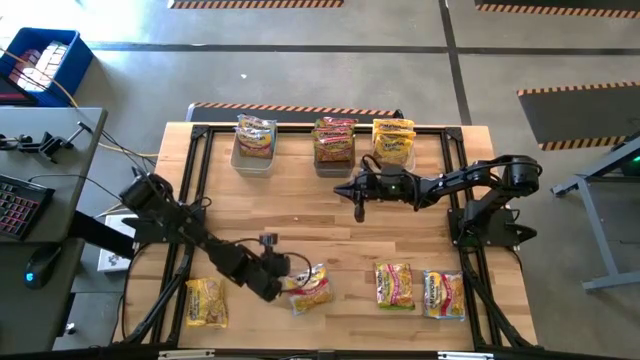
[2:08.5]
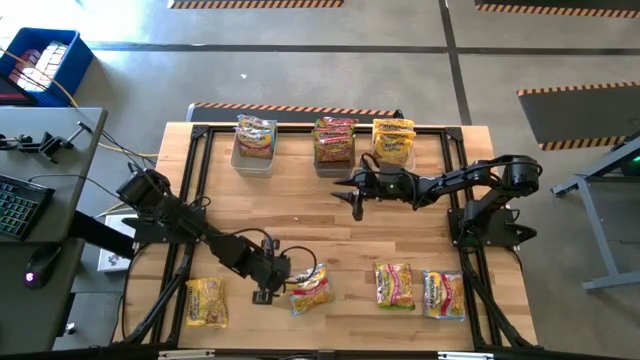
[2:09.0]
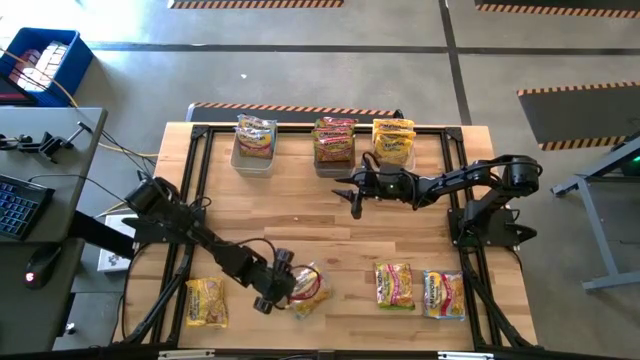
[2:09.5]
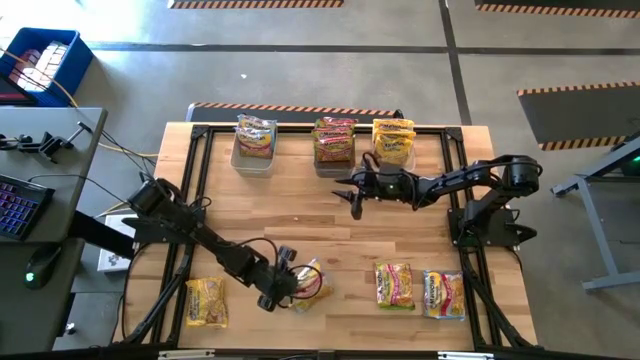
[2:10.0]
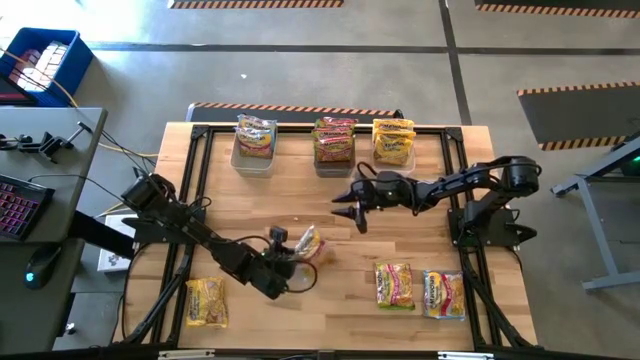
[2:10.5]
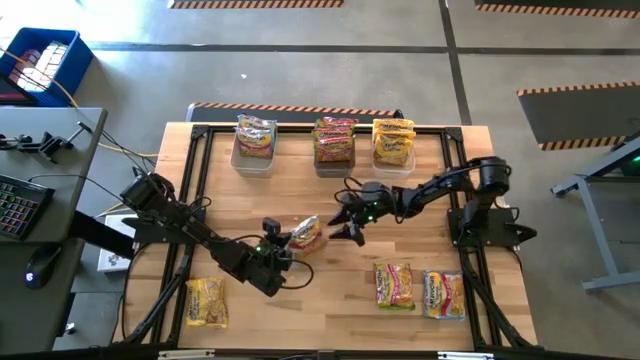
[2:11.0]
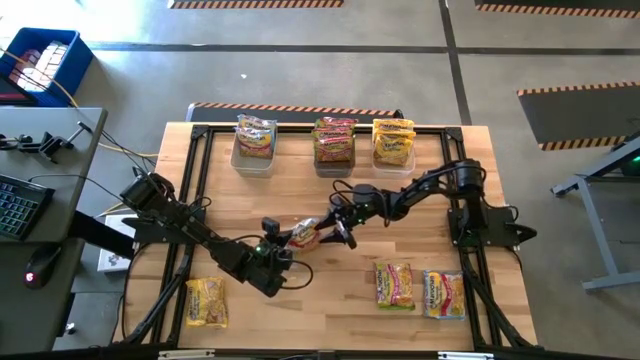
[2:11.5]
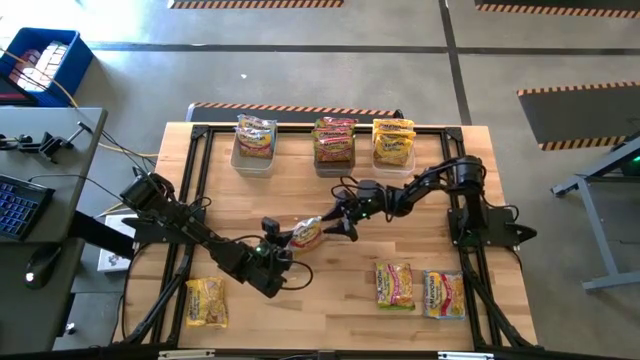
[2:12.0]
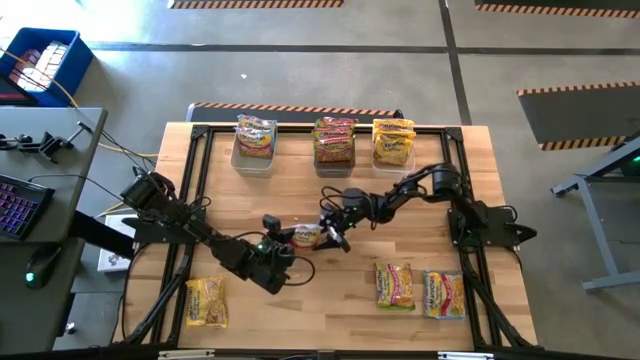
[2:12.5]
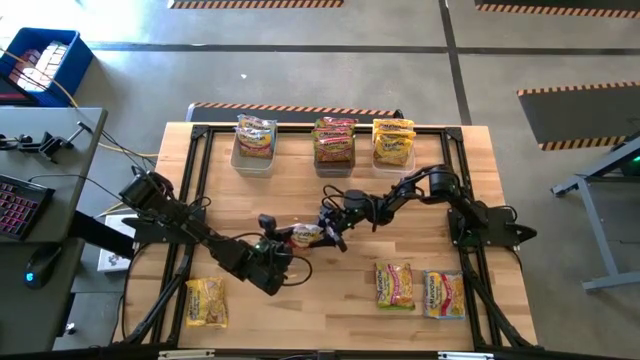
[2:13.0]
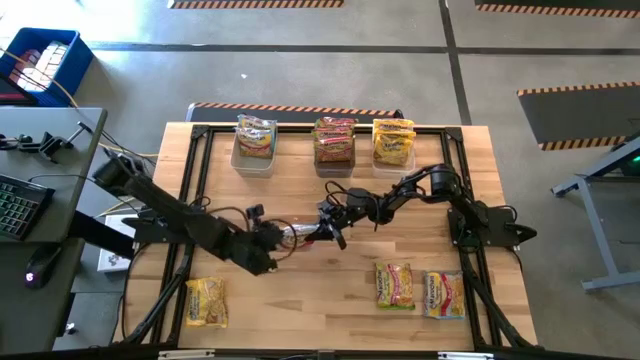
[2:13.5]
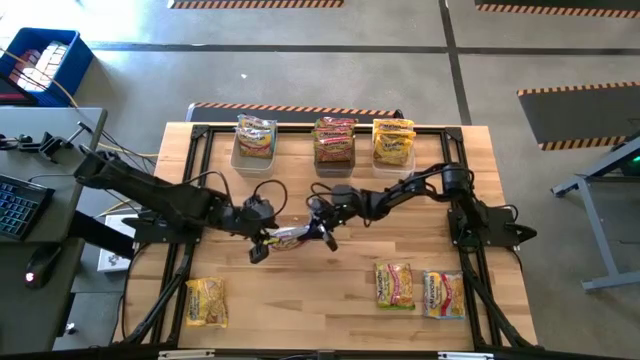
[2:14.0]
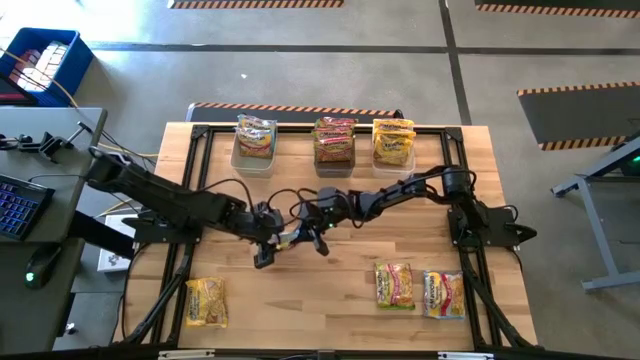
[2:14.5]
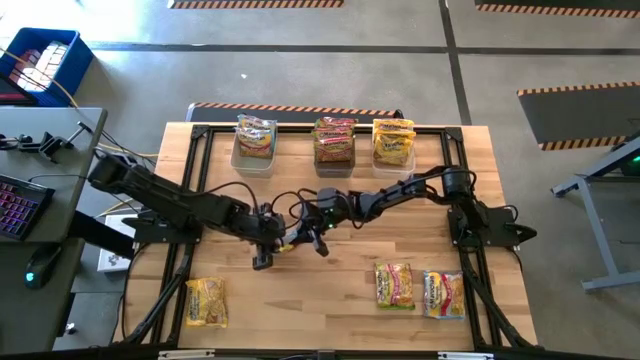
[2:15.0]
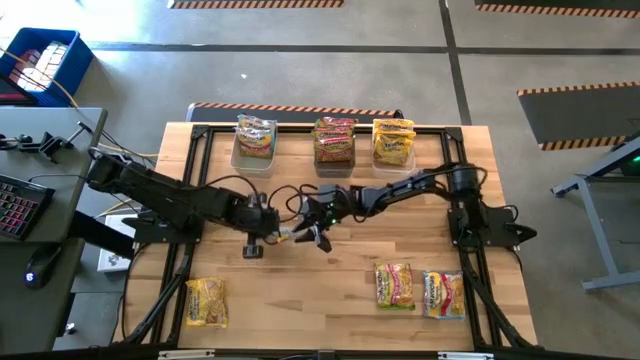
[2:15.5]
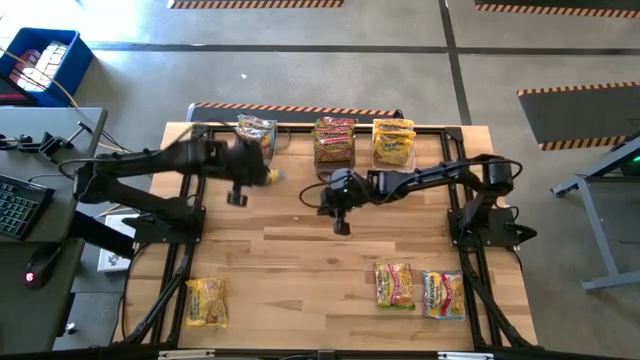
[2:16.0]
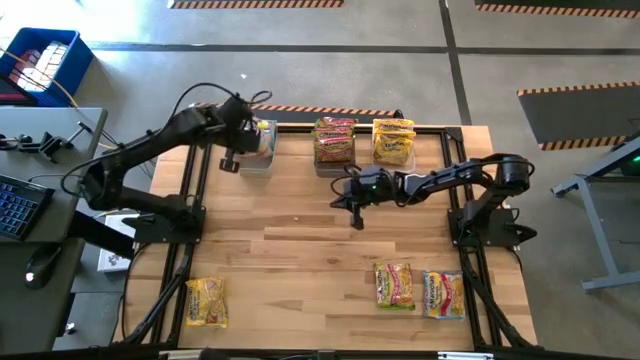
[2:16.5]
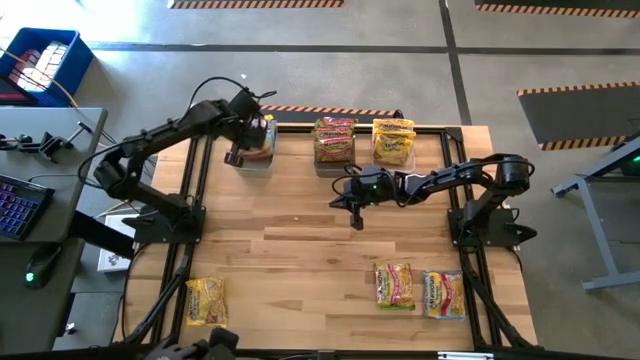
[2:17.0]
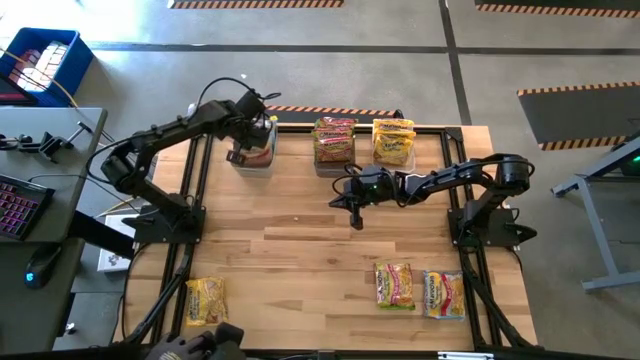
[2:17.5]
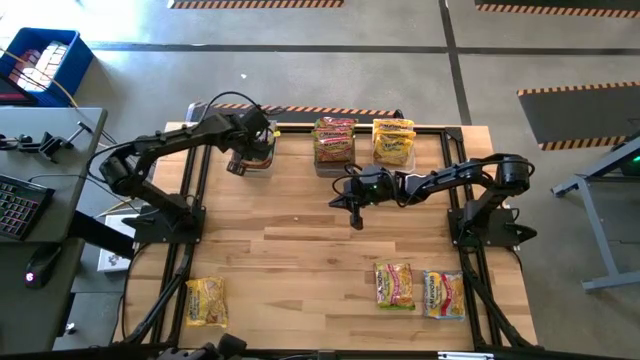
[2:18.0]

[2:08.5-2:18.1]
Task: Sort Maruchan noodles
Put the blue noodle pack into the gray bin

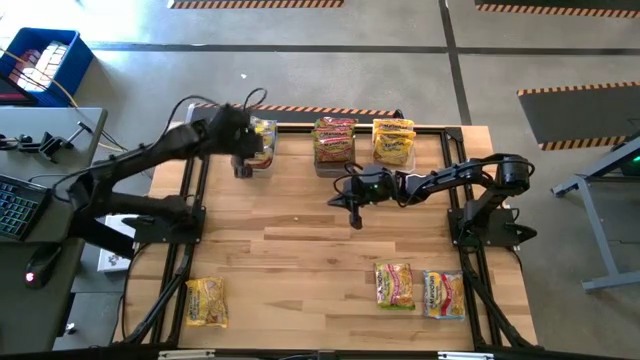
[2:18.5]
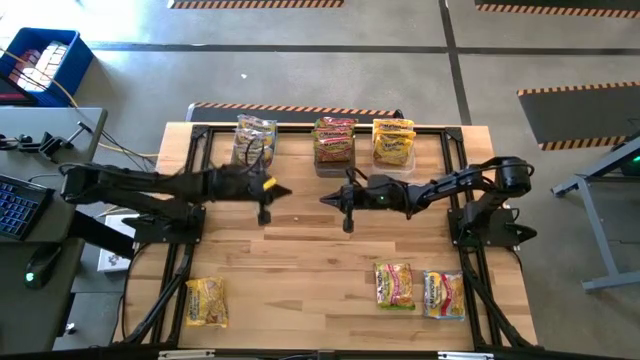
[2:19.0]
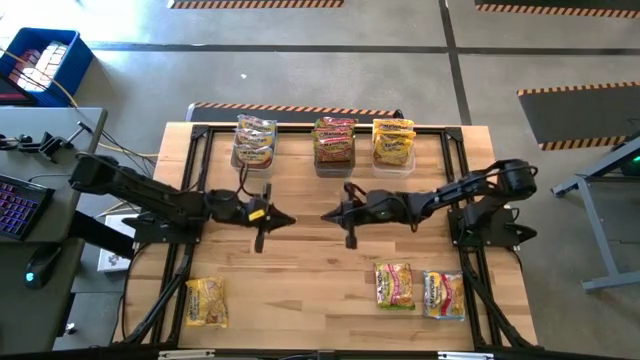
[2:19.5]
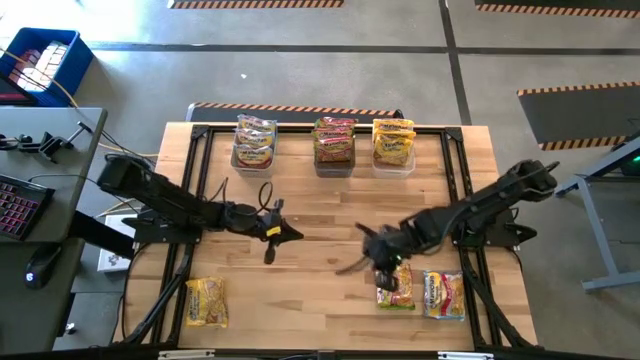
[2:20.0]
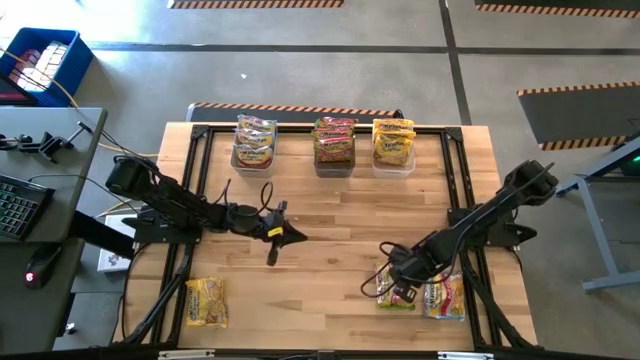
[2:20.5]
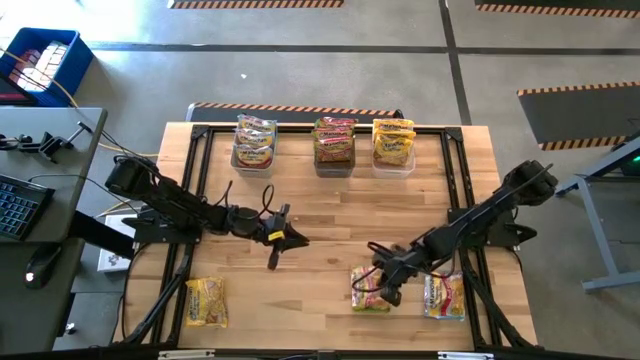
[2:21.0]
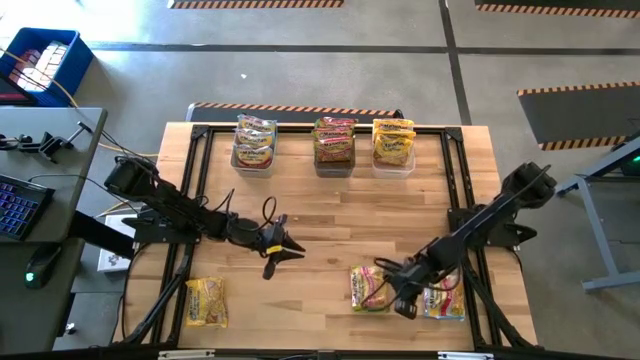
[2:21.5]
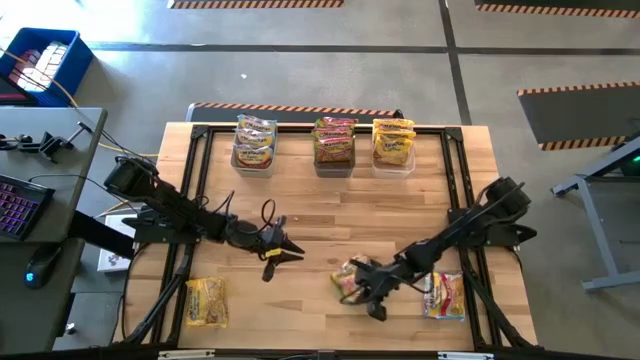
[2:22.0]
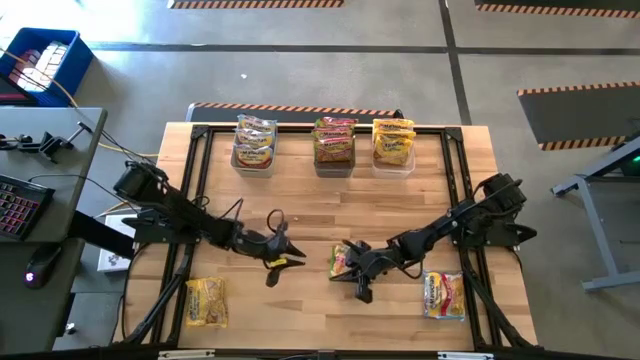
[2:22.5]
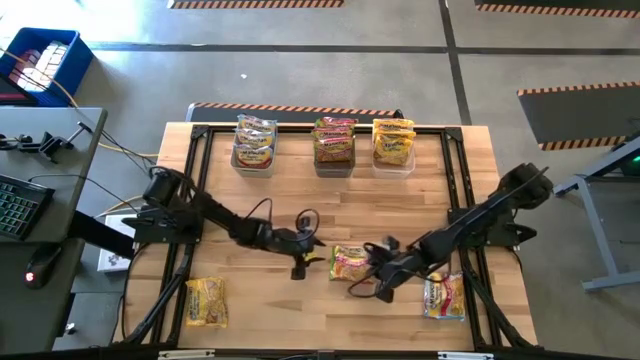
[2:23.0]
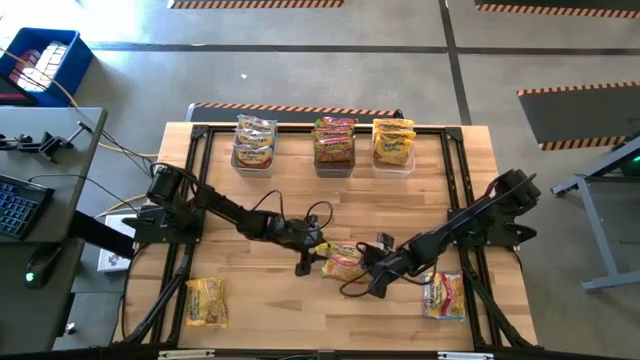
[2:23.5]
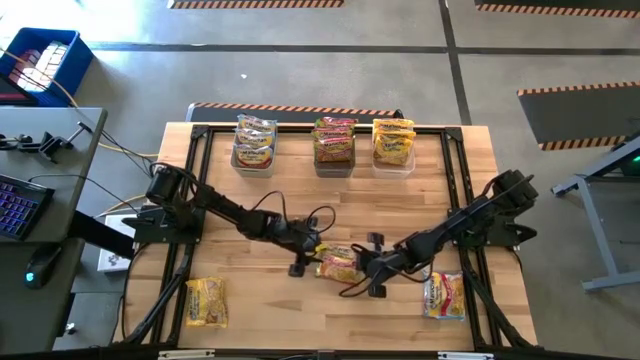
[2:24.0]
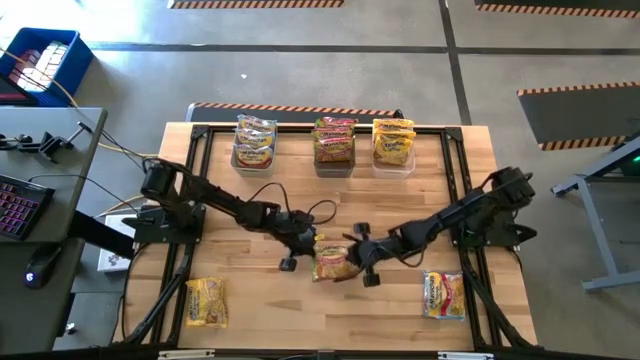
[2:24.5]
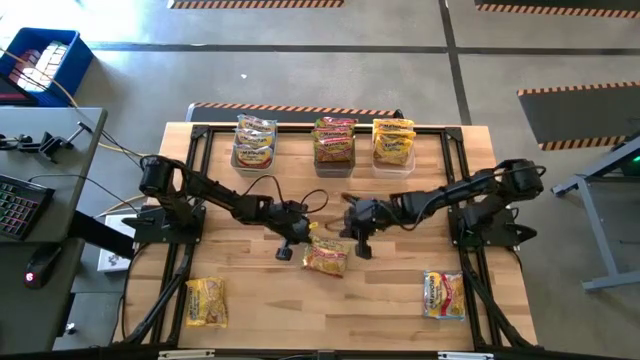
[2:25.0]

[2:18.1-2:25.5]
Put the green noodle pack into the black bin

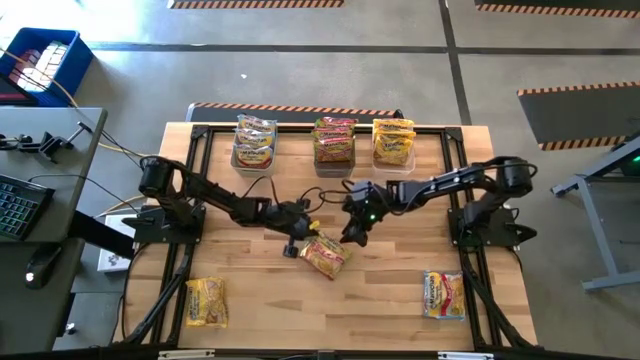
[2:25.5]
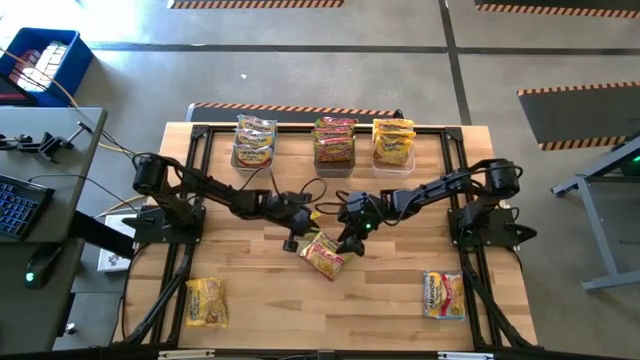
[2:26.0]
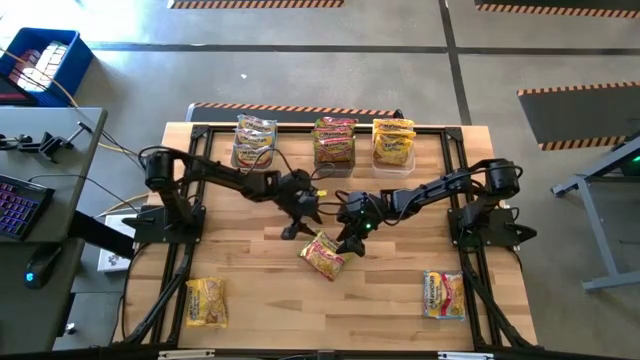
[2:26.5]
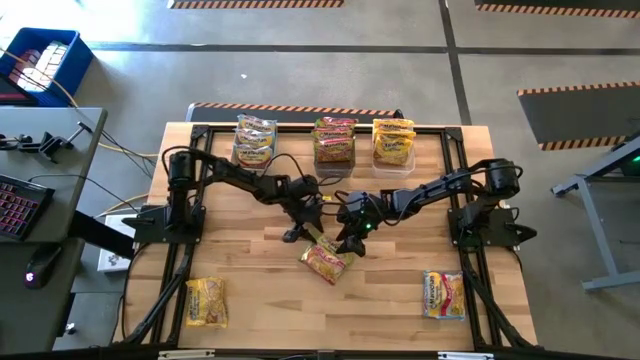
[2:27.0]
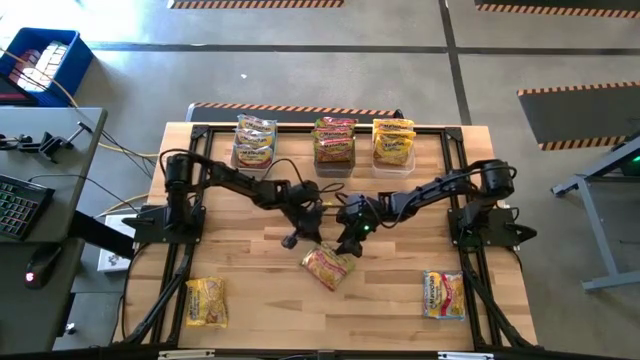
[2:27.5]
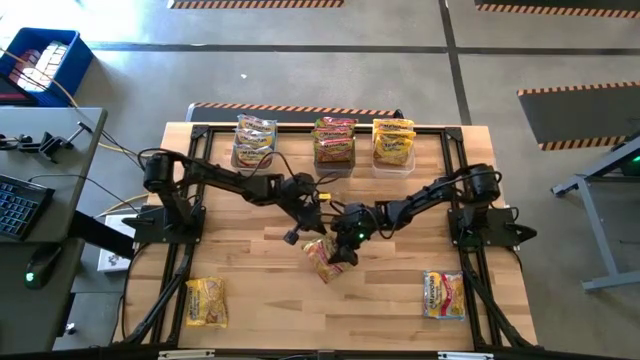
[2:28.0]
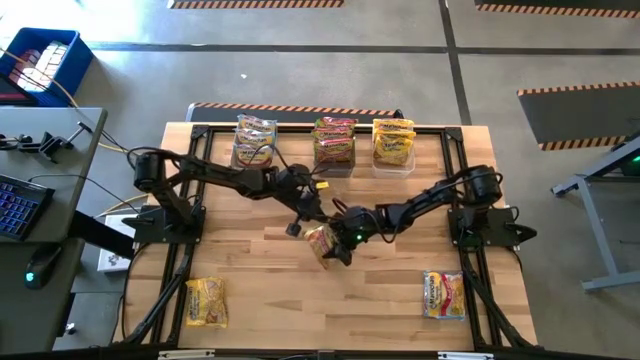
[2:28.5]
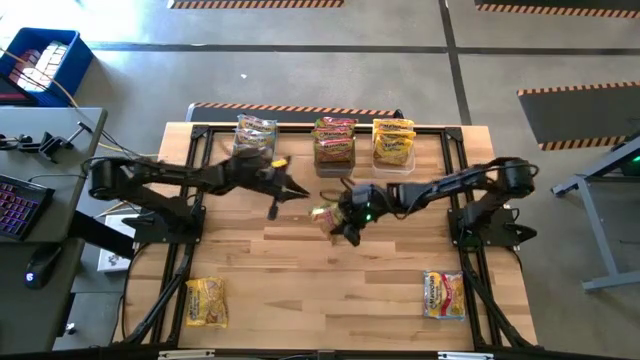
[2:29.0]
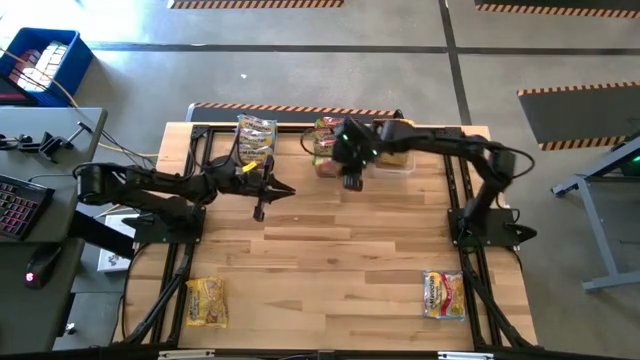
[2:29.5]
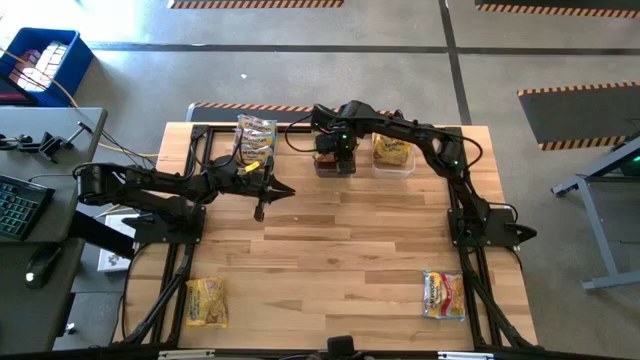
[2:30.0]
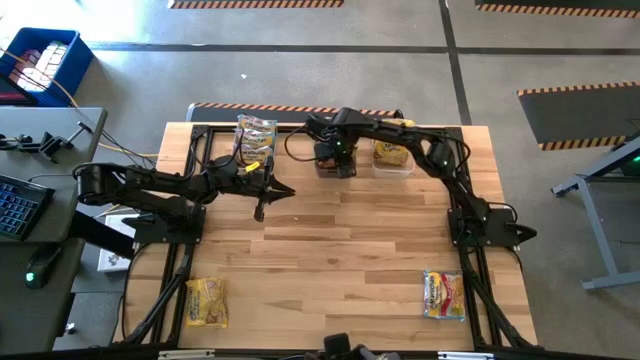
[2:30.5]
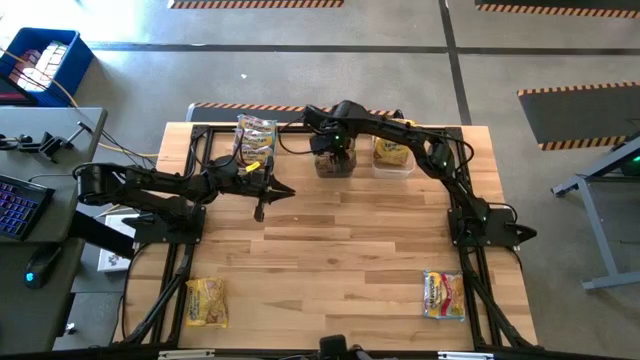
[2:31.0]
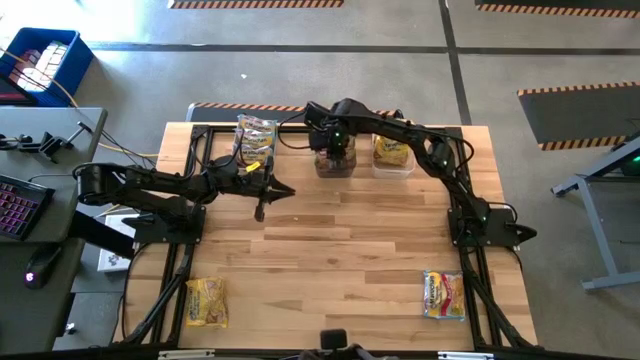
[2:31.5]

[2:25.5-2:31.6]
Put the green noodle pack into the black bin
